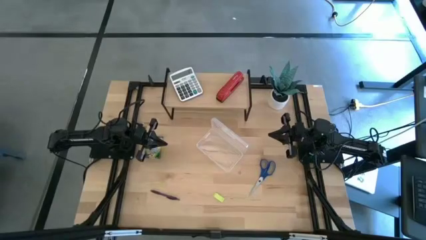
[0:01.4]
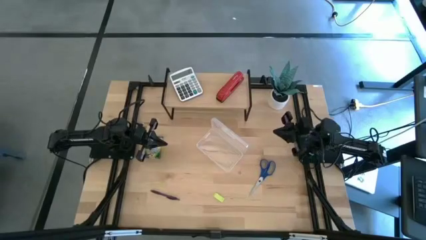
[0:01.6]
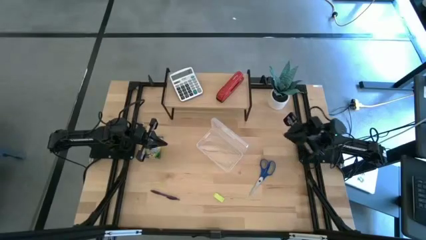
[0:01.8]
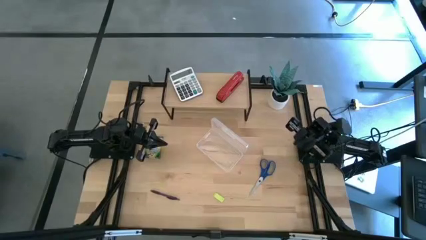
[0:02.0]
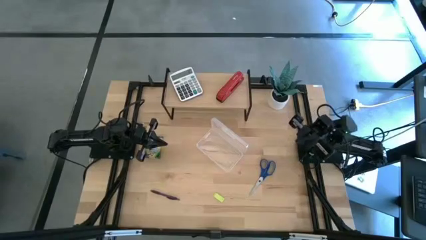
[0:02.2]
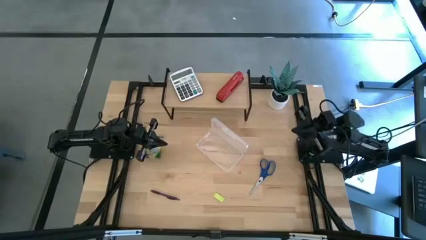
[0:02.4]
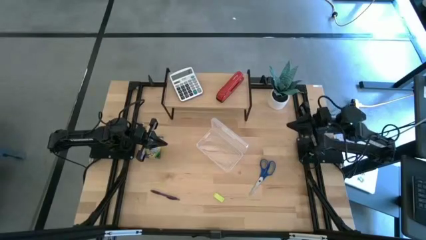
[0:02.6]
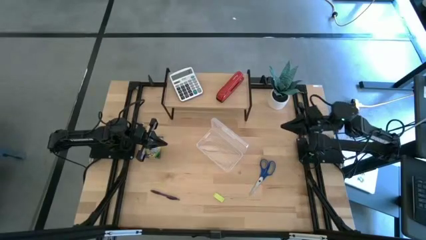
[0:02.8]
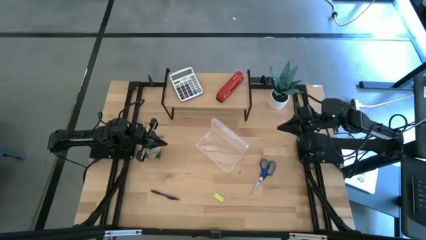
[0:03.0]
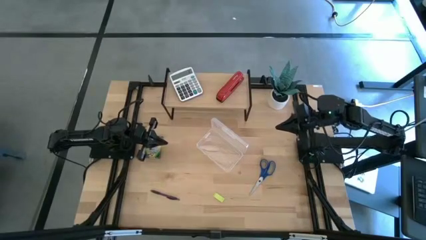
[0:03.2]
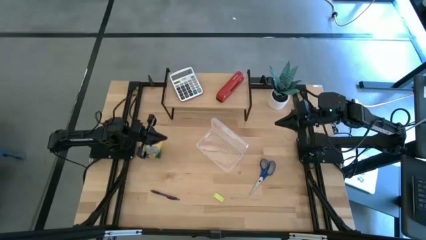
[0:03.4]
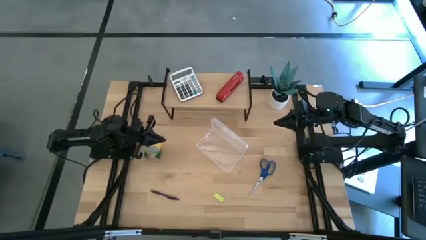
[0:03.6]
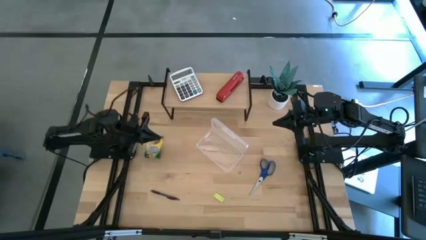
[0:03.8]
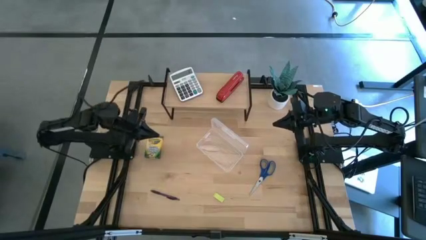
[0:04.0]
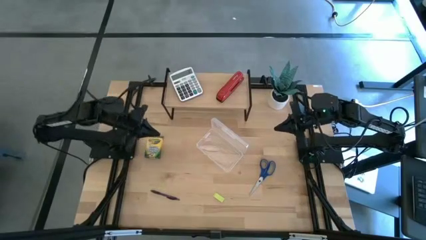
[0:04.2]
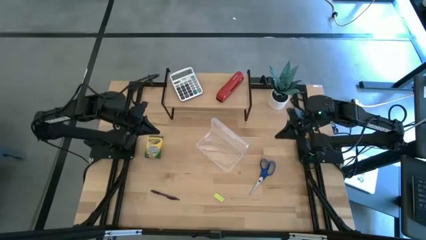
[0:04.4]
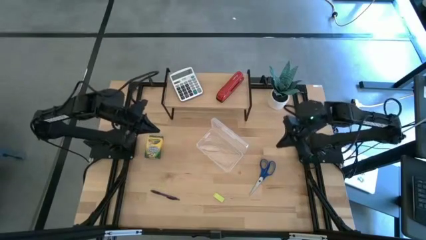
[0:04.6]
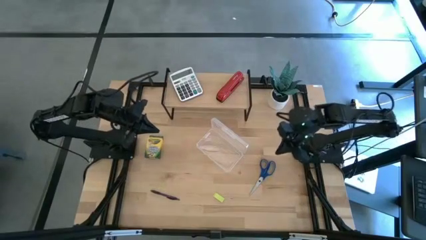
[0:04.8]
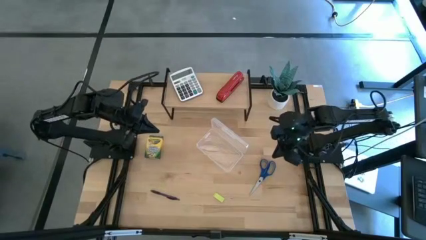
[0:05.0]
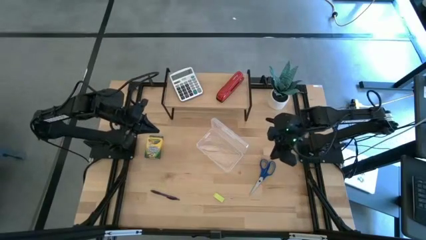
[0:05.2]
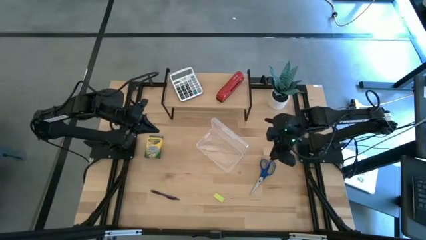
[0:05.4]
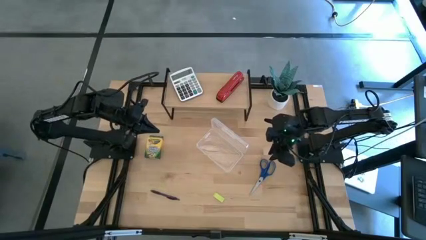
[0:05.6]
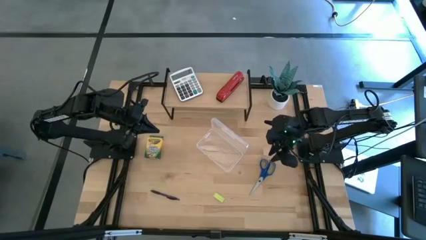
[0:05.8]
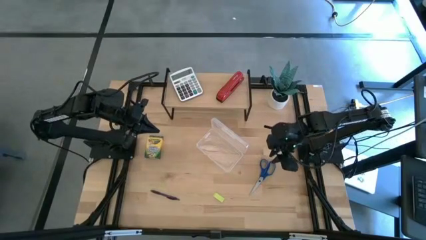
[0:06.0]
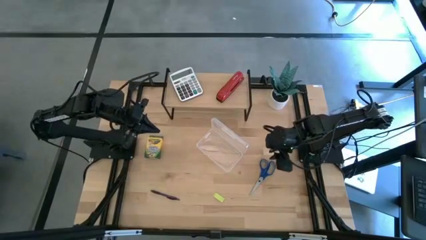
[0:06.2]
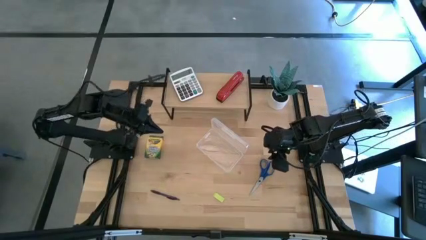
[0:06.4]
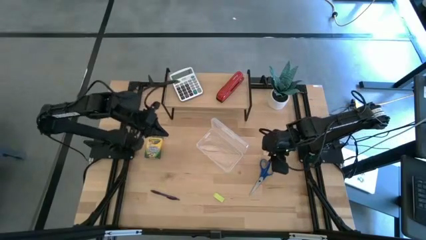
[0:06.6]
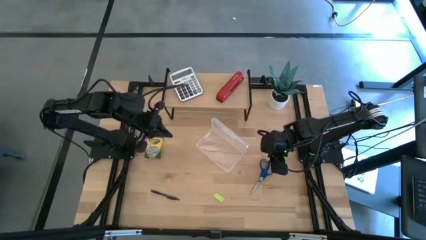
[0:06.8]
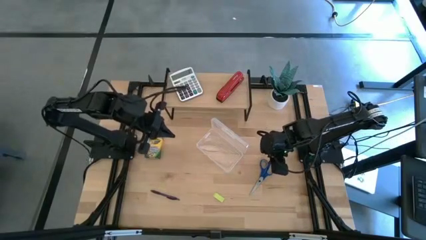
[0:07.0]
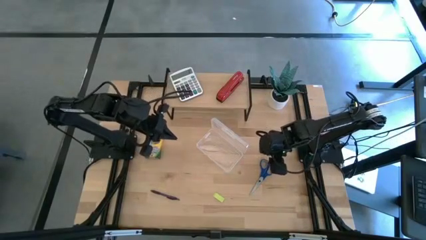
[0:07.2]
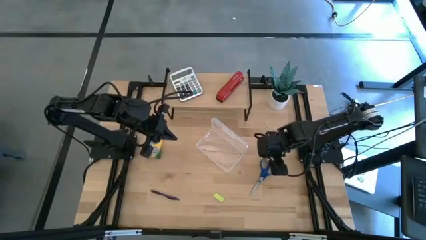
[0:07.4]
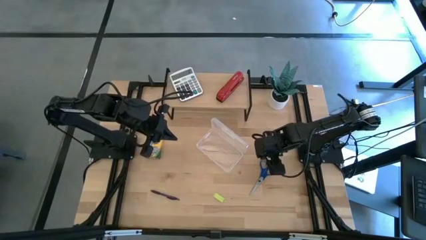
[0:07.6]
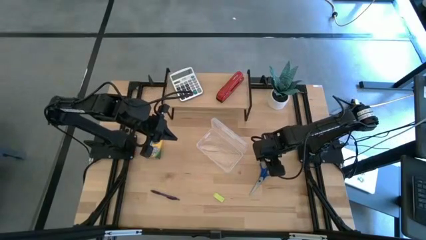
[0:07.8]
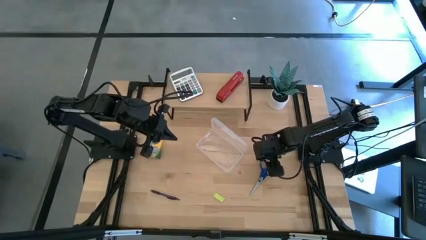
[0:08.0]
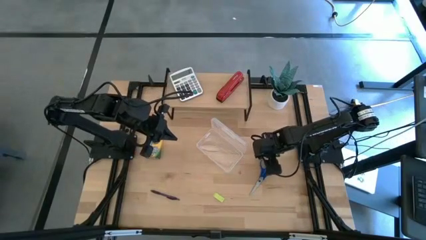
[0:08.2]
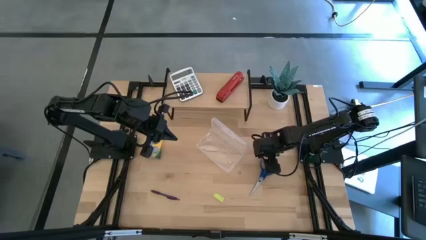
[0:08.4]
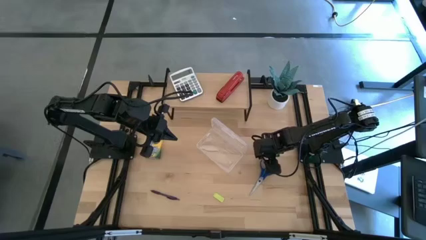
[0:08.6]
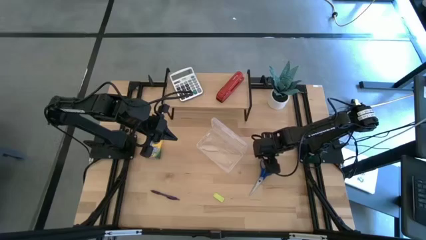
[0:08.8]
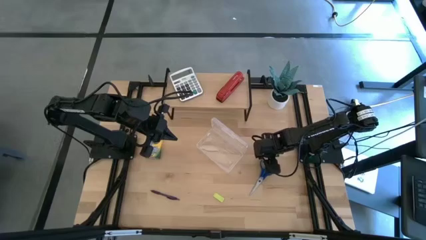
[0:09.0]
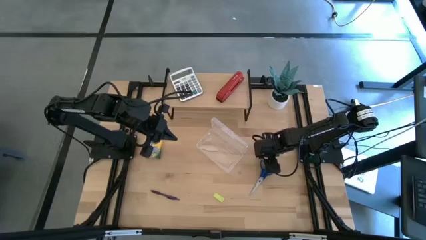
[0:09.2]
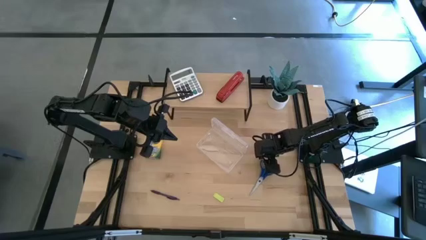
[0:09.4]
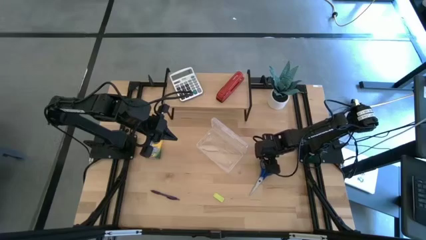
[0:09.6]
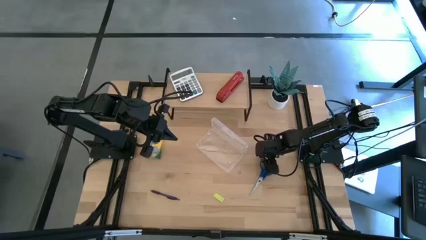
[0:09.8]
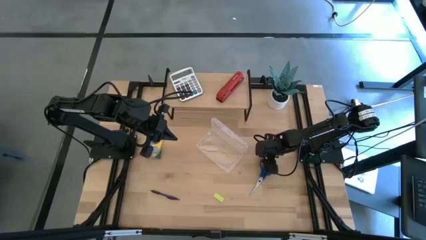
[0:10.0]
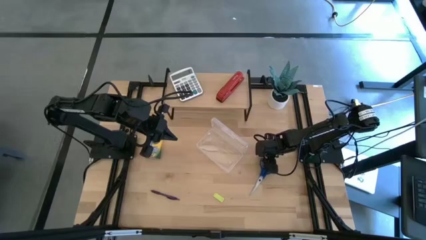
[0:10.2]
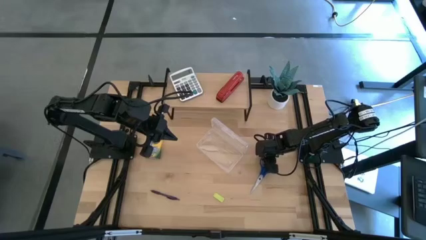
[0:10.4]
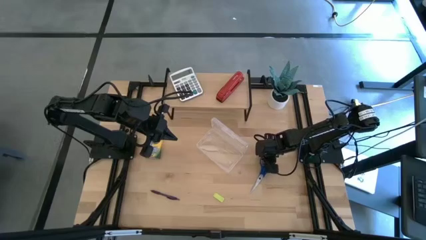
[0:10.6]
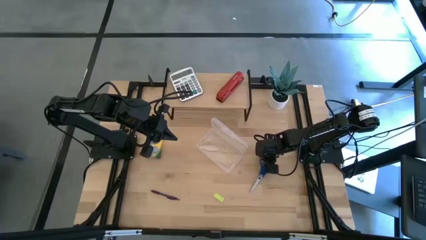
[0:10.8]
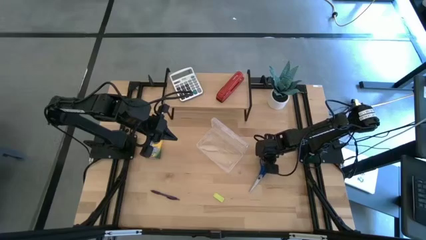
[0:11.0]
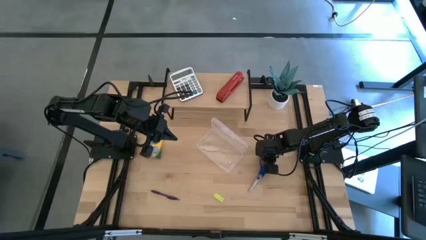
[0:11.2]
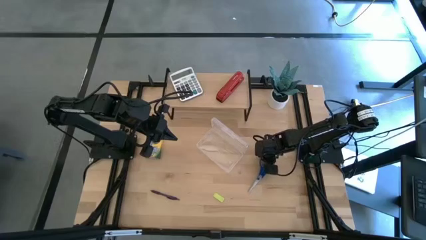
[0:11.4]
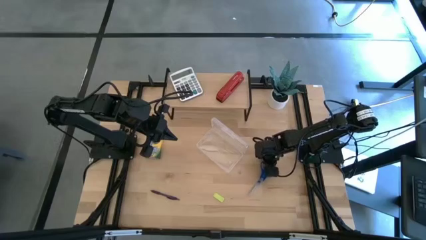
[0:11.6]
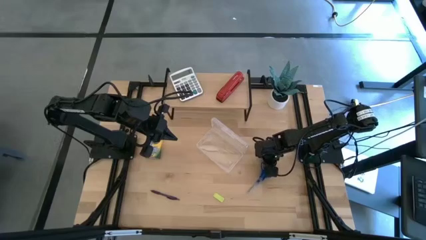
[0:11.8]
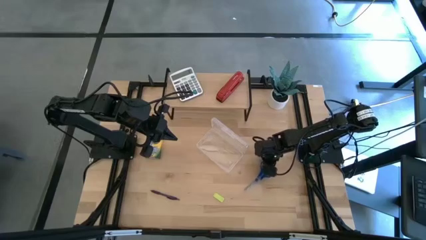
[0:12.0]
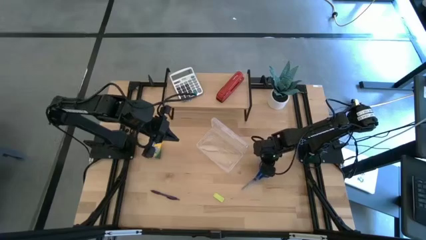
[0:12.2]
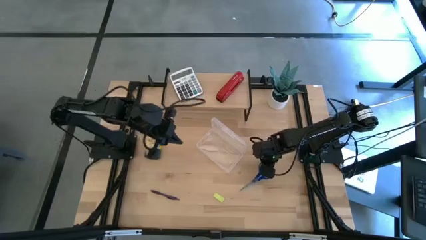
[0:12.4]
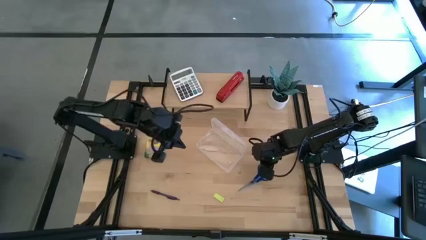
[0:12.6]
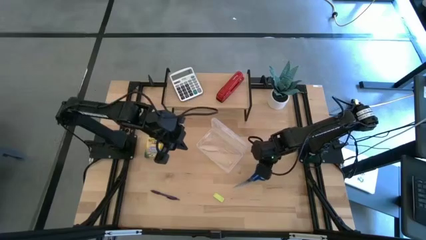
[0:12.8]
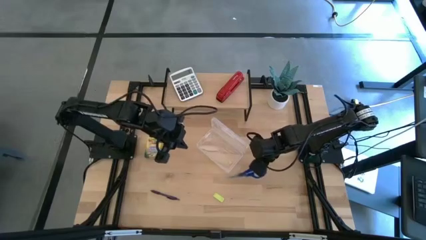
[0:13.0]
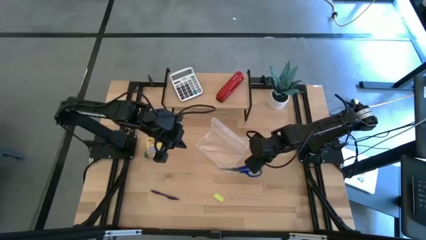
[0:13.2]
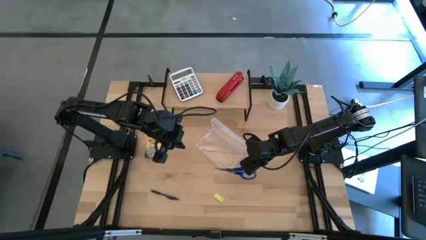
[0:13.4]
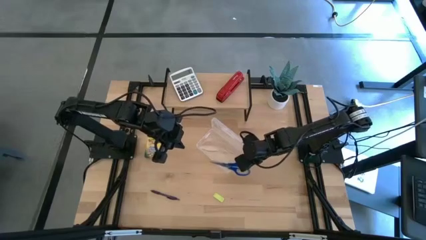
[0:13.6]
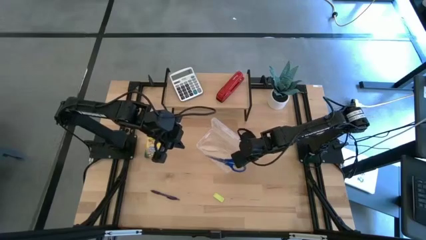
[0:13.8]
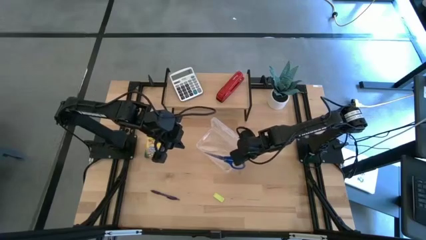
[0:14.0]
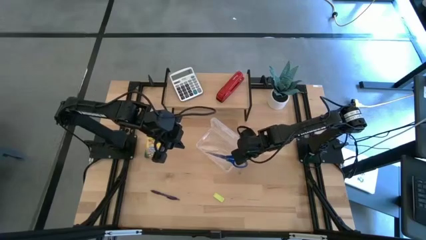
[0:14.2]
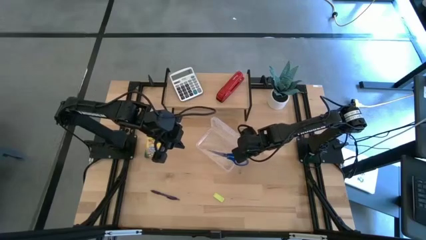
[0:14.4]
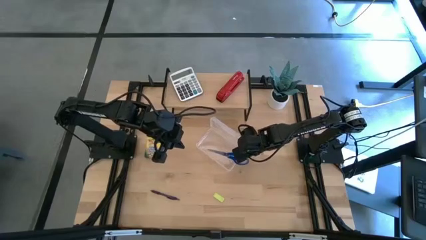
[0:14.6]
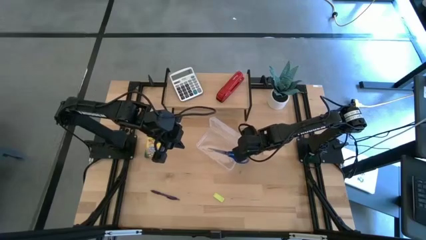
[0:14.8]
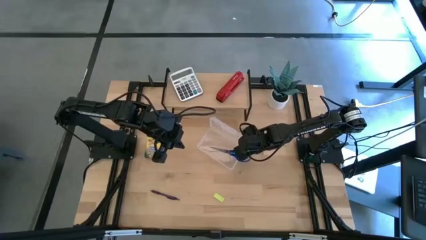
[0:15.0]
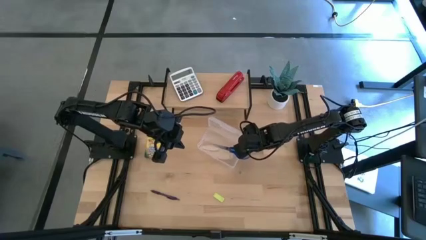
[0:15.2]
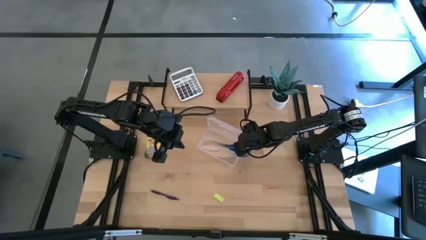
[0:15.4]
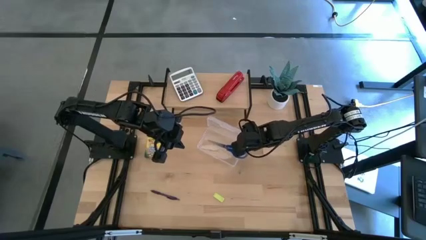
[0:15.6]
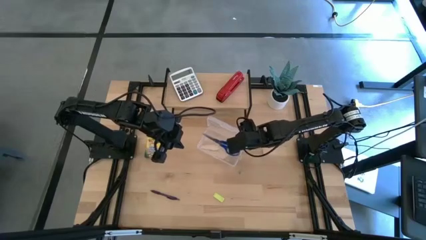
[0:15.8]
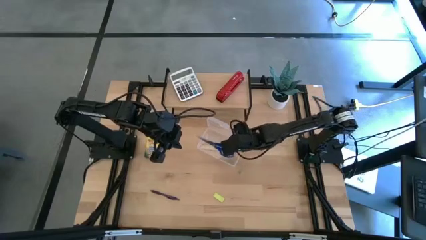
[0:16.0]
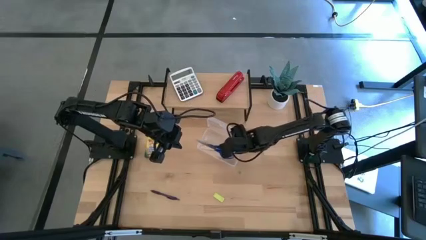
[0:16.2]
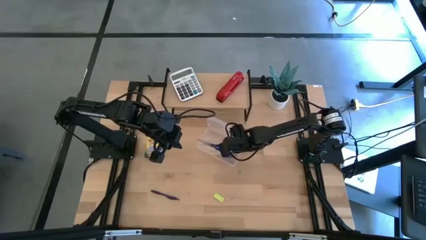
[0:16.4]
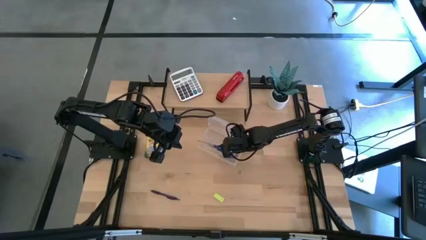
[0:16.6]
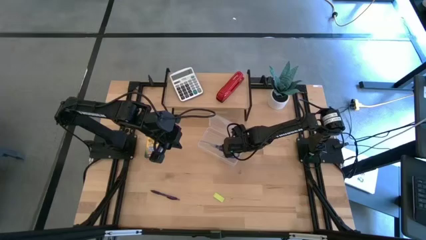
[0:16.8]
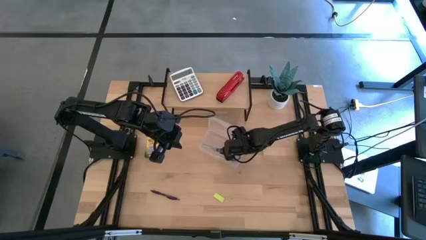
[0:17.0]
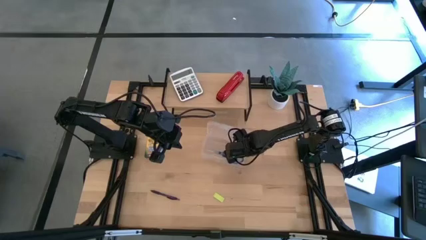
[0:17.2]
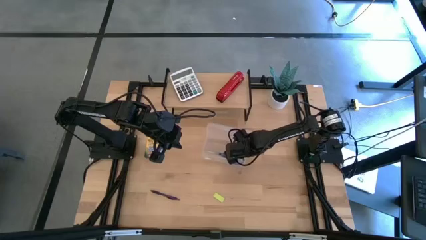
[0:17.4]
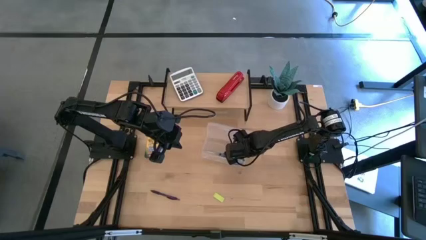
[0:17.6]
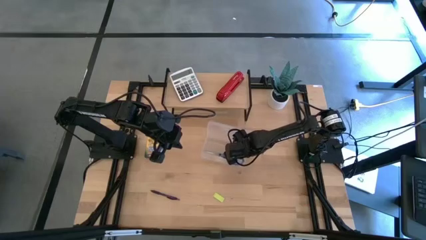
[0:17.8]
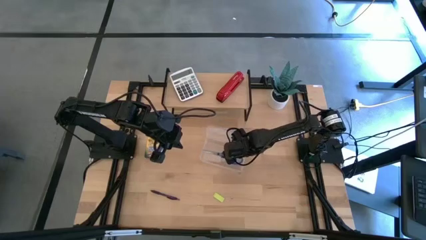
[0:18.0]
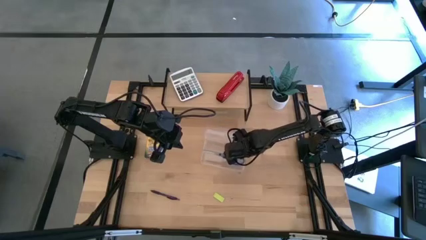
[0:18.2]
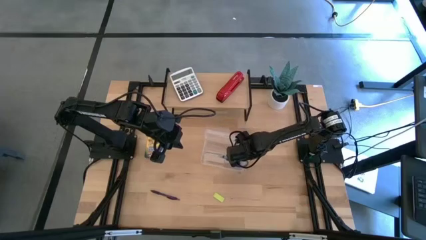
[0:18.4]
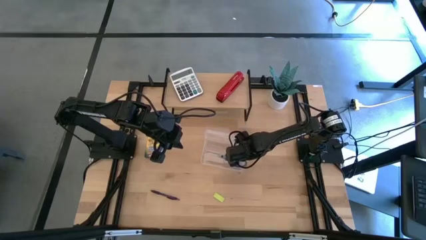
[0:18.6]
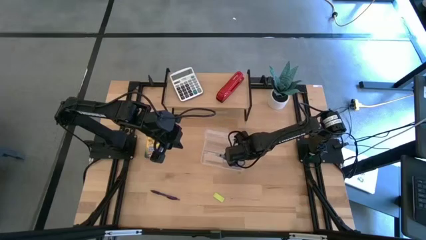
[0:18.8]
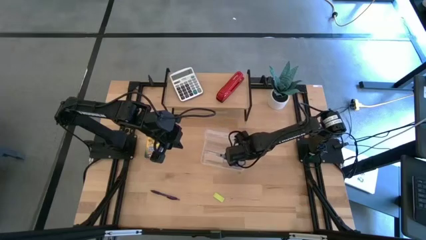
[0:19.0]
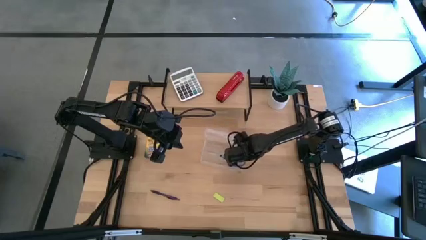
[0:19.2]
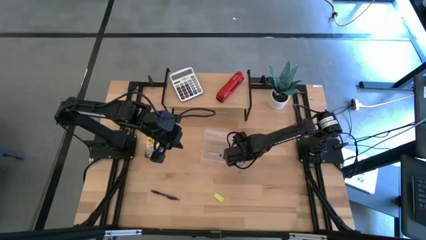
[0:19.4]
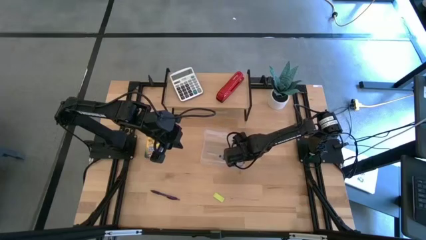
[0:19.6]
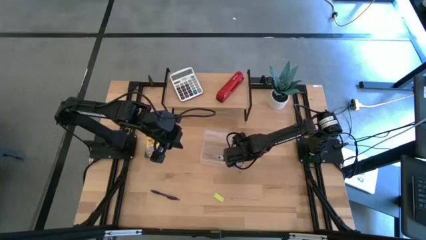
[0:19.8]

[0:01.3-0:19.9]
Task: Pack school essentials
Put the blue scissors into the transparent supply box
